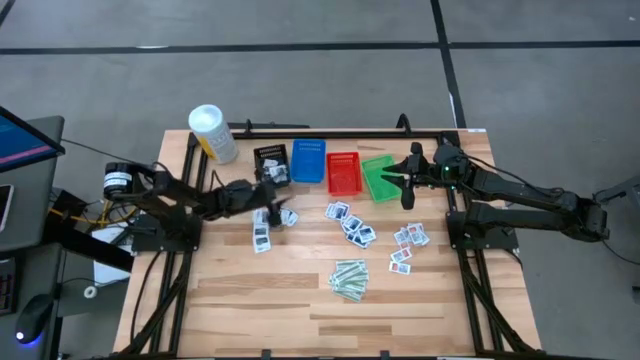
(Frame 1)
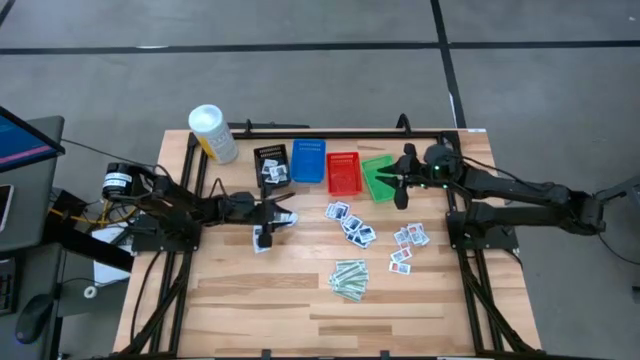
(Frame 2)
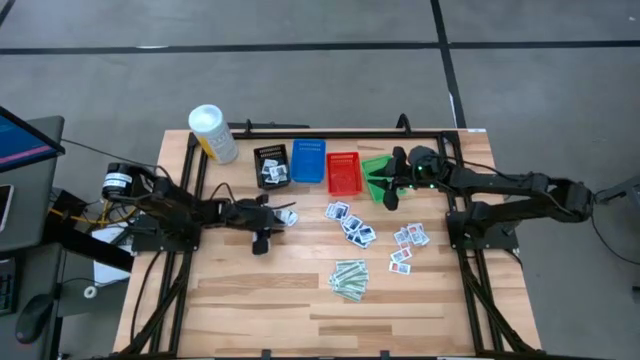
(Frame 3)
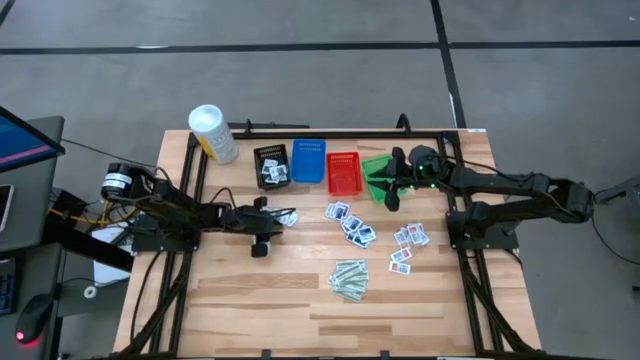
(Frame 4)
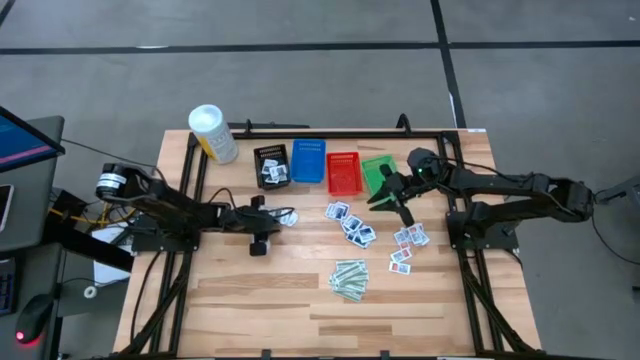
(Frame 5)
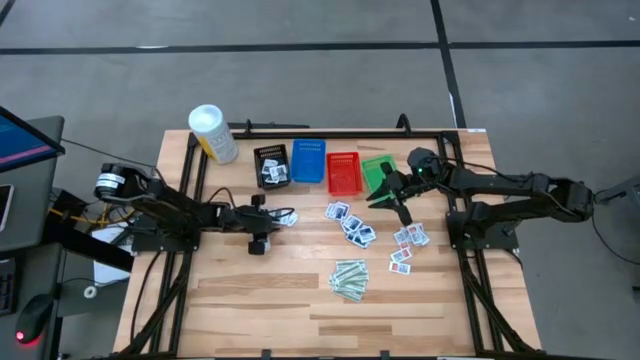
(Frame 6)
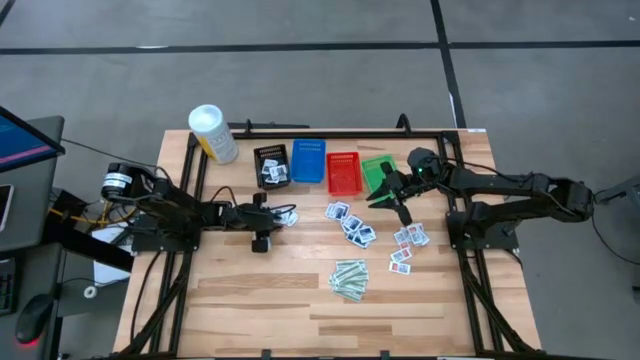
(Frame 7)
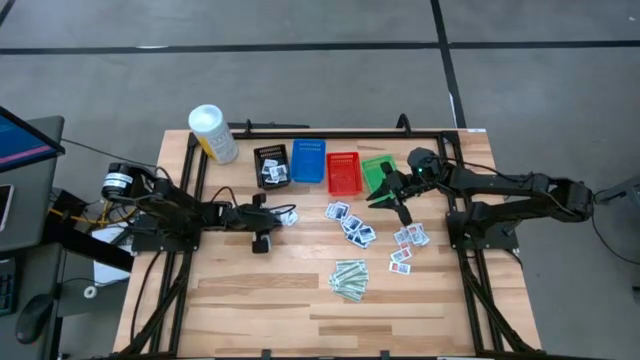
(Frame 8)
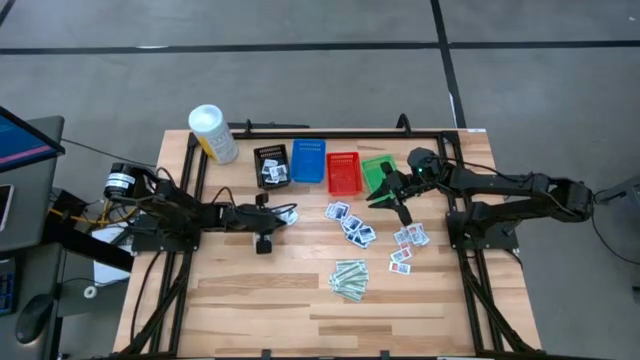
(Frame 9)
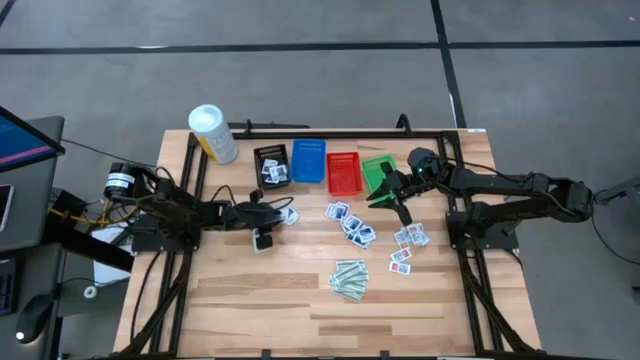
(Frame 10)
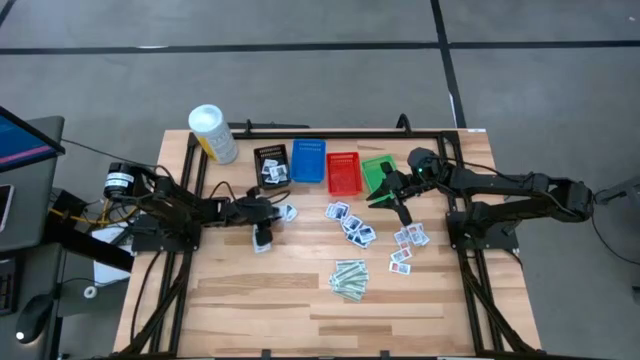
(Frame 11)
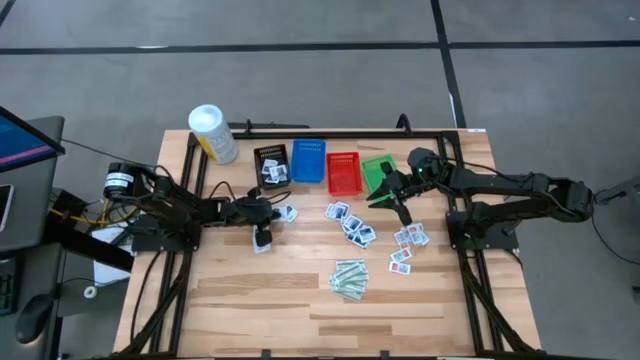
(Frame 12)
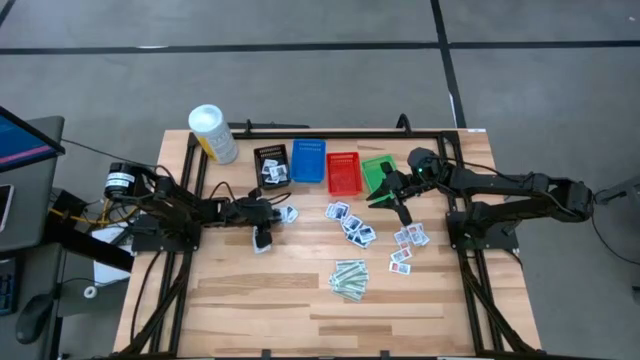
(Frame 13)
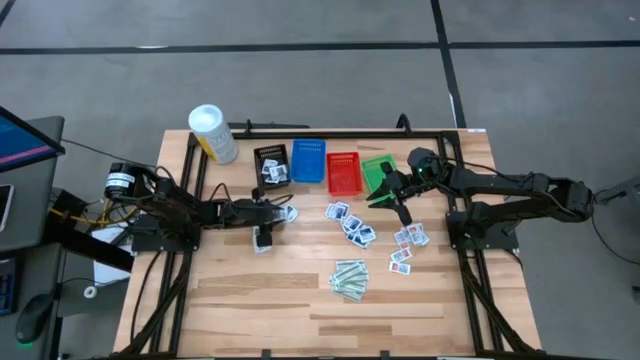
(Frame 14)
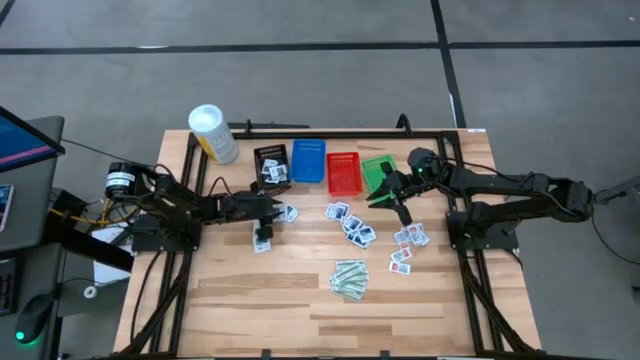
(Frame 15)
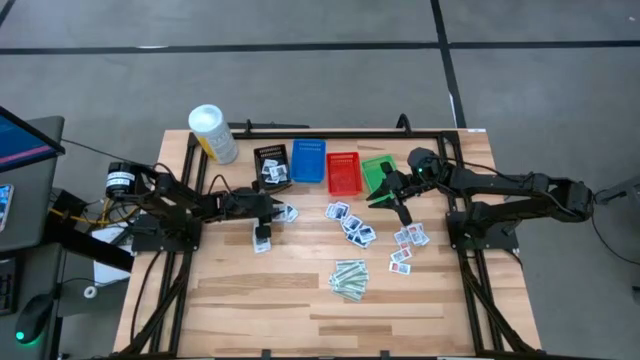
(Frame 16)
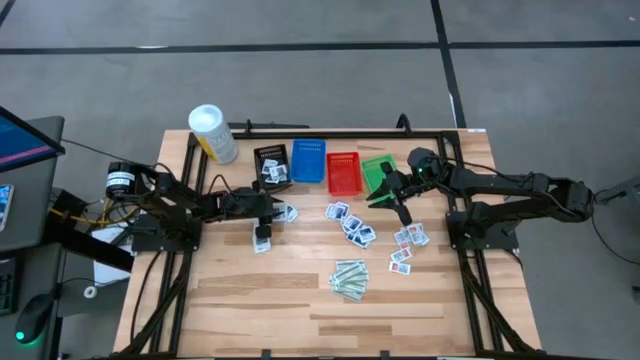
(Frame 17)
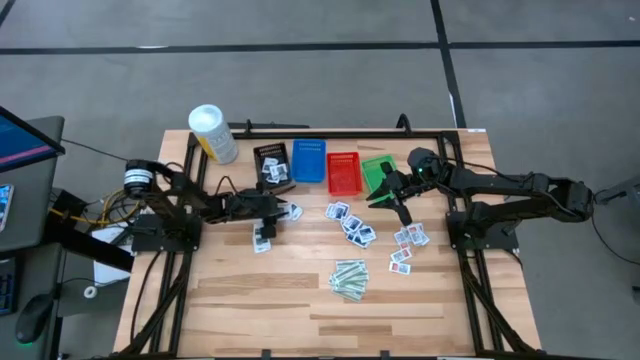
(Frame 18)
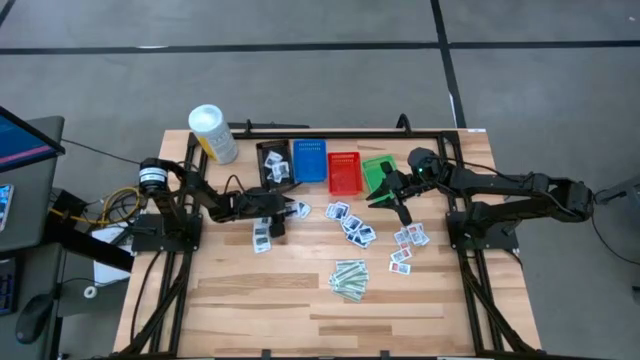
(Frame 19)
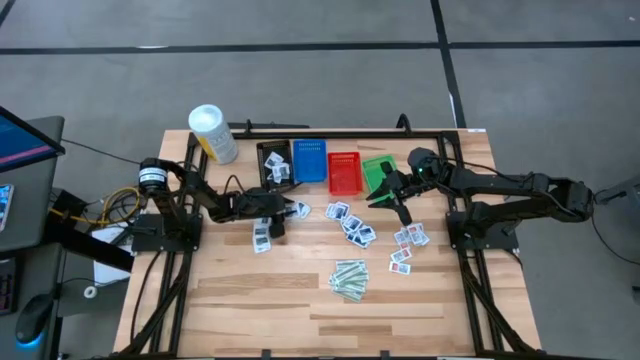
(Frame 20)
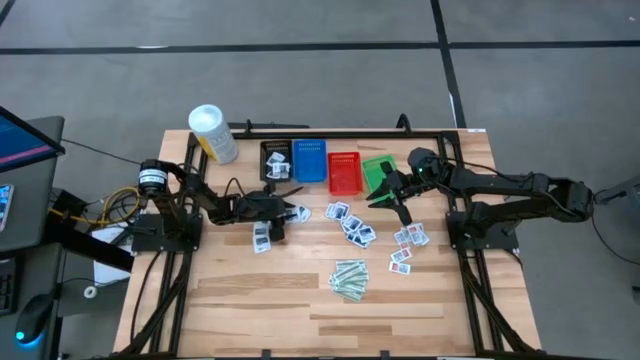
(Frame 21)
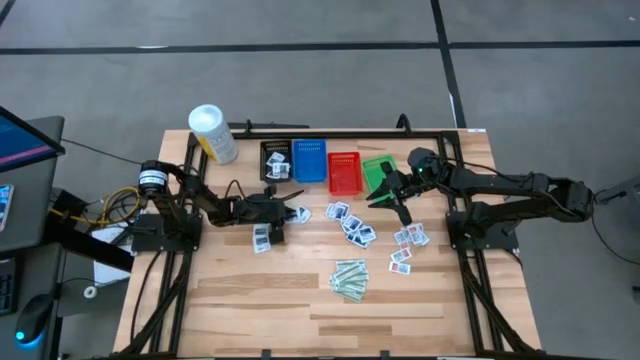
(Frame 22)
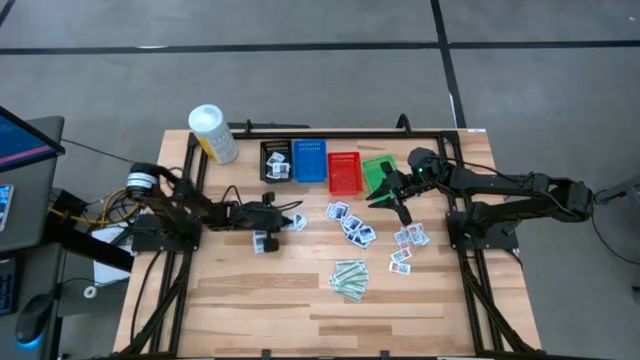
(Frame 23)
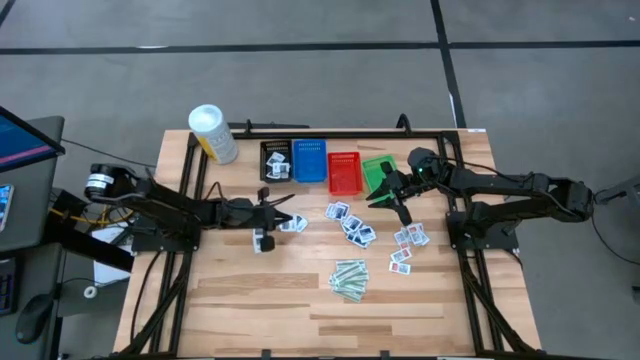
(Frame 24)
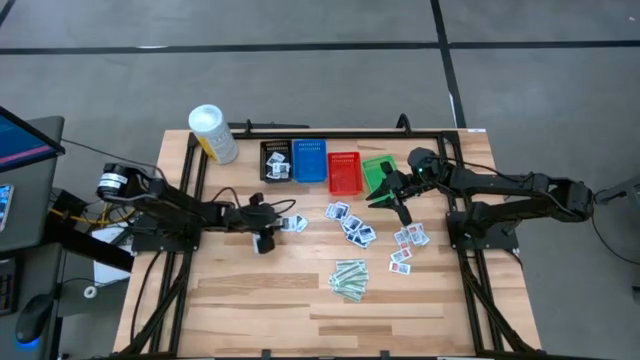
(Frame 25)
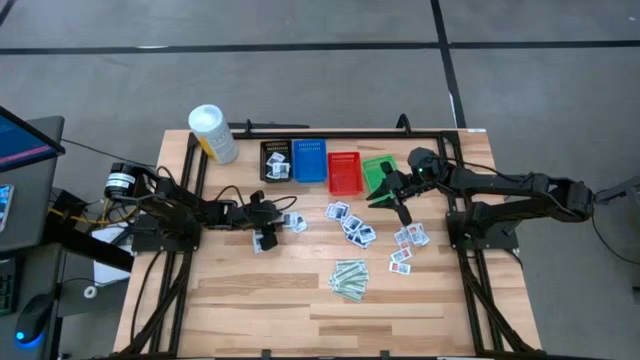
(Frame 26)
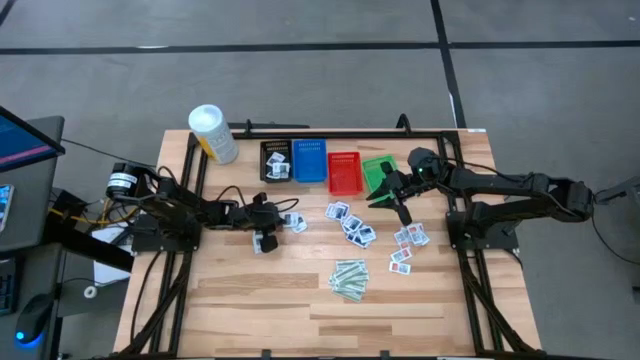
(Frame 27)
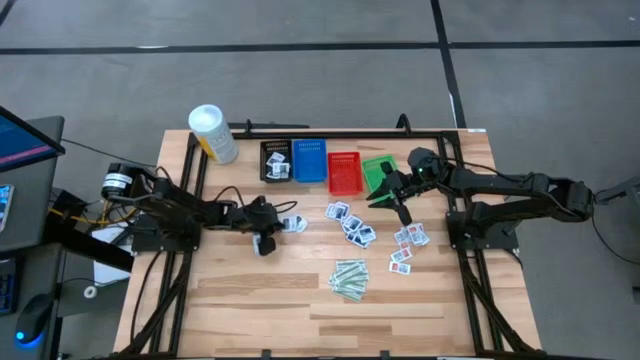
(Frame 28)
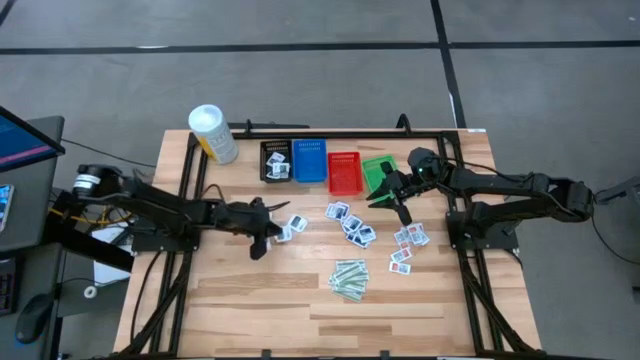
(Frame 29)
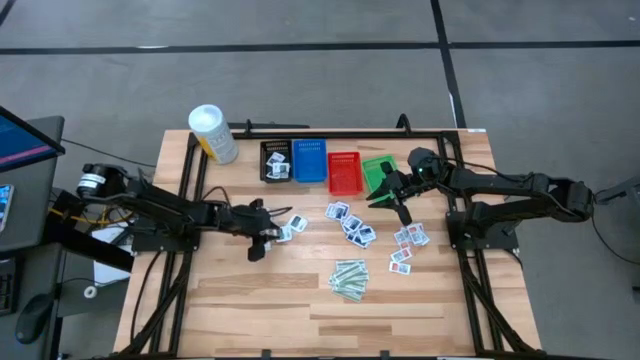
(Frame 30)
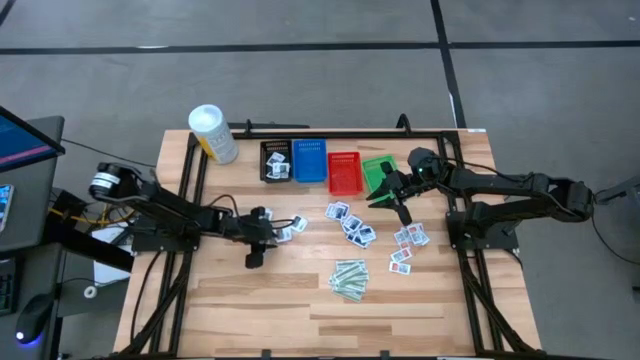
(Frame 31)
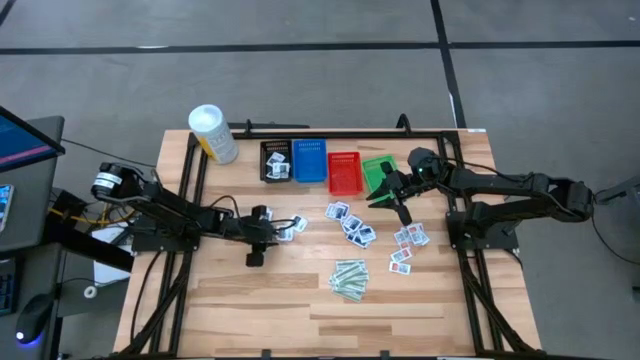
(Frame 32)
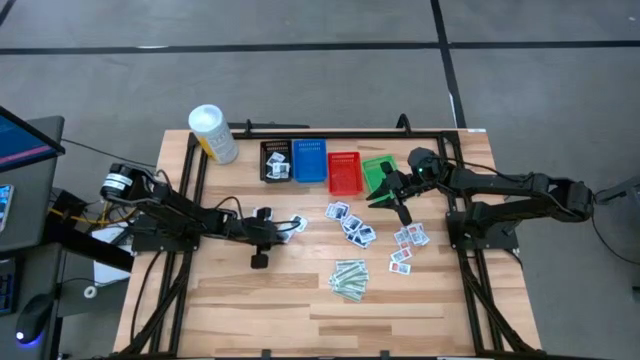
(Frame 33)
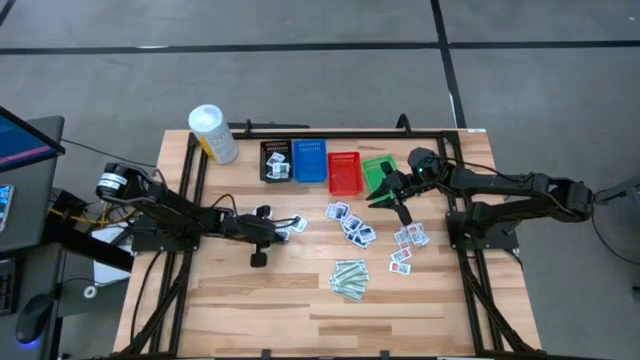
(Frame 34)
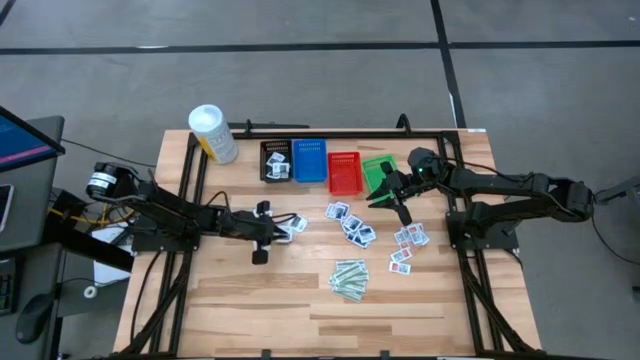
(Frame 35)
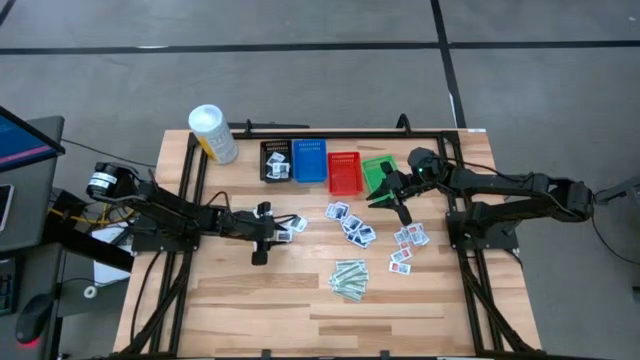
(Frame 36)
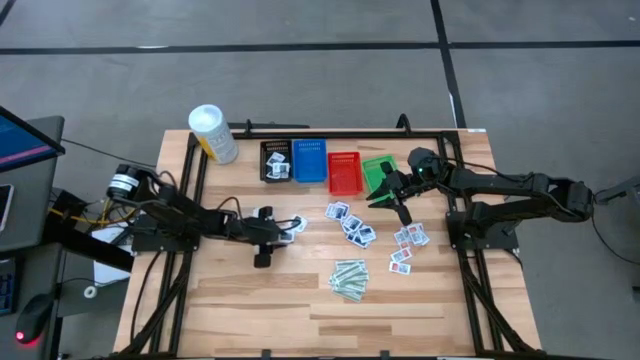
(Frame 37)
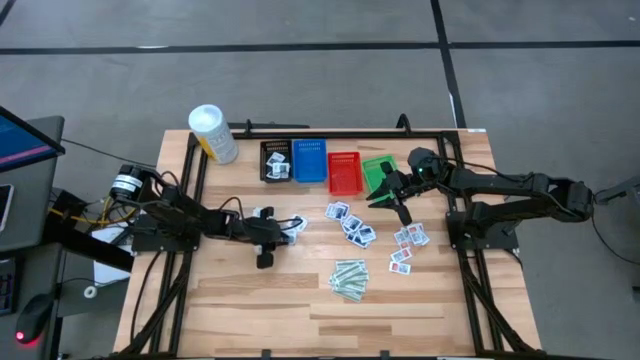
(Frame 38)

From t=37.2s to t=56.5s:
Task: Pick & Place First Aid Supplies
Put the gray pad into the black bin

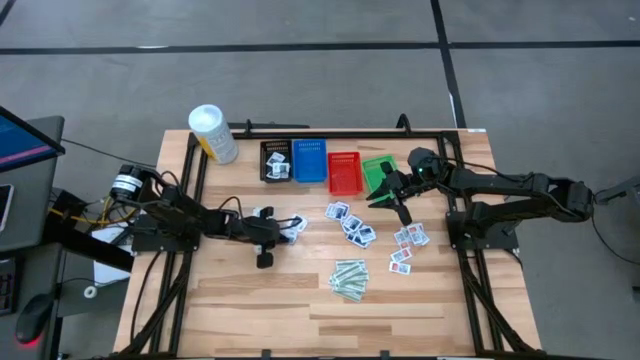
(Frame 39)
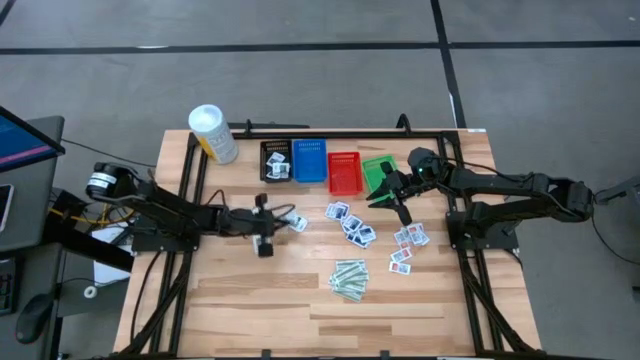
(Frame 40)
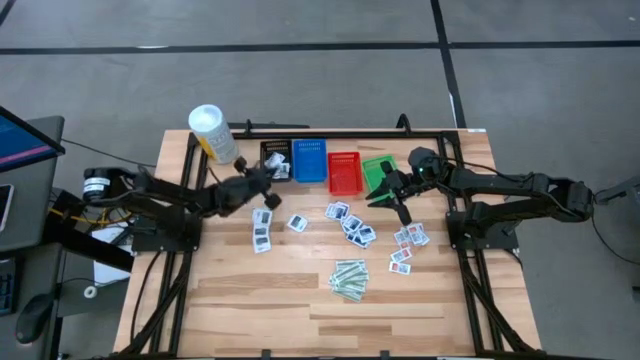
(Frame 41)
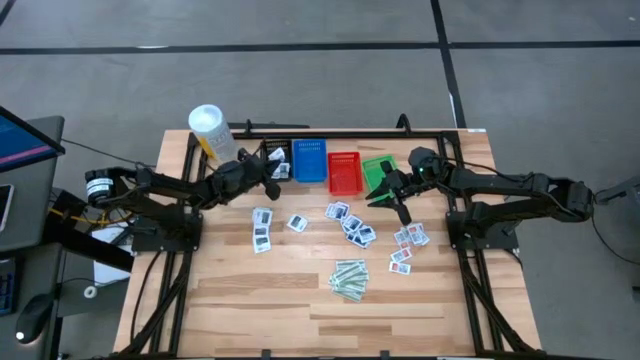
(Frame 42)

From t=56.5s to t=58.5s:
Put the gray pad into the black bin
